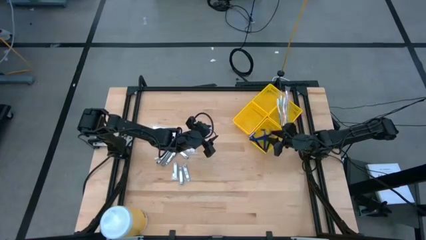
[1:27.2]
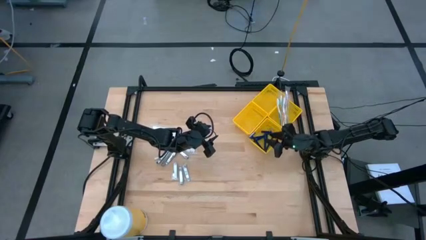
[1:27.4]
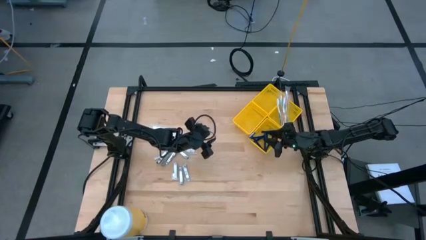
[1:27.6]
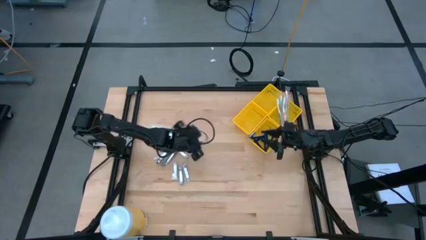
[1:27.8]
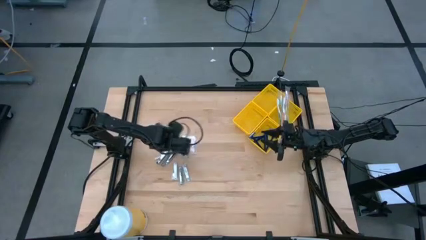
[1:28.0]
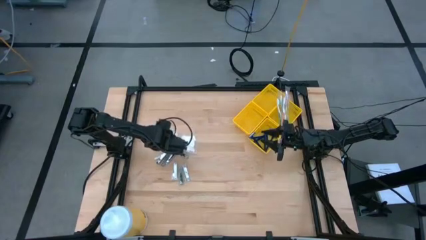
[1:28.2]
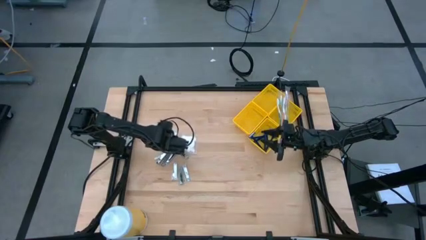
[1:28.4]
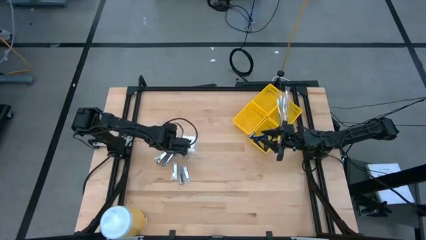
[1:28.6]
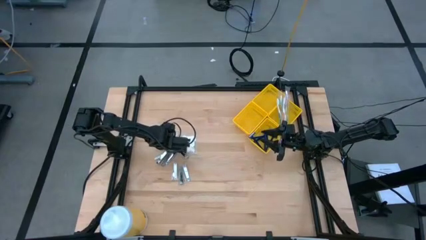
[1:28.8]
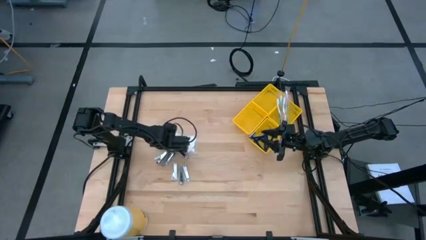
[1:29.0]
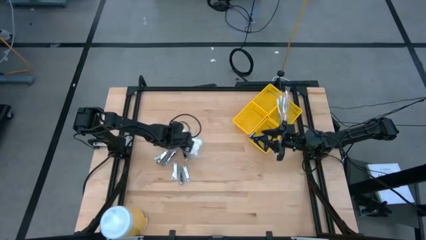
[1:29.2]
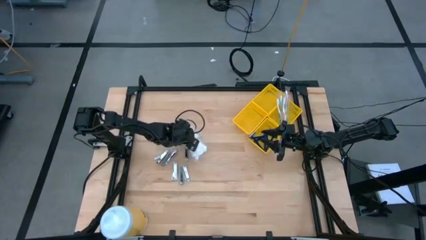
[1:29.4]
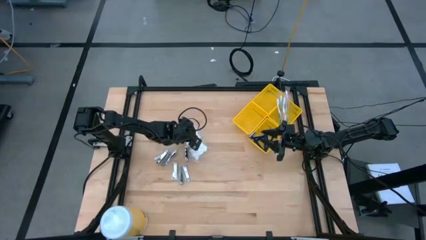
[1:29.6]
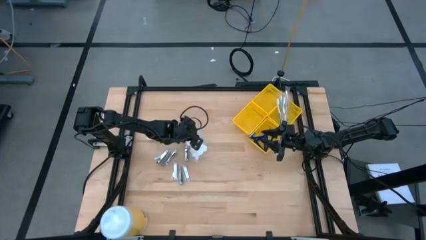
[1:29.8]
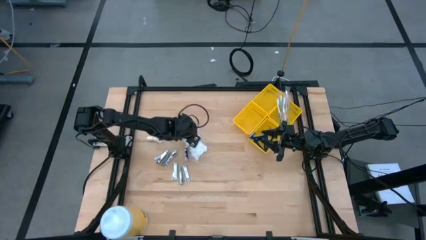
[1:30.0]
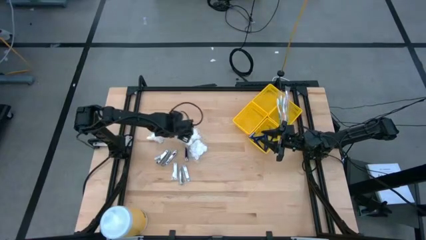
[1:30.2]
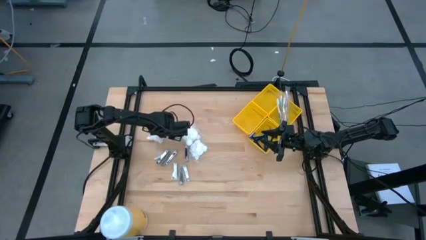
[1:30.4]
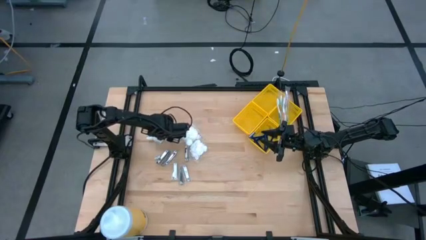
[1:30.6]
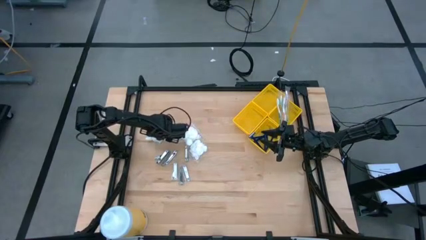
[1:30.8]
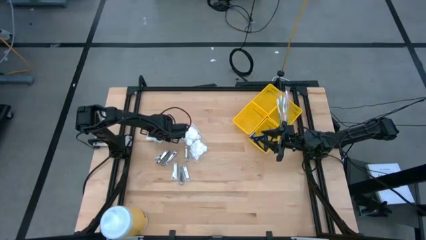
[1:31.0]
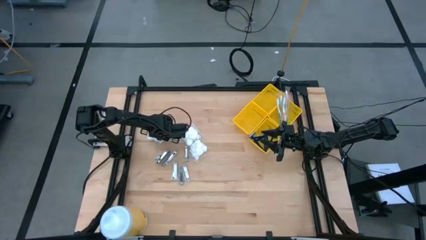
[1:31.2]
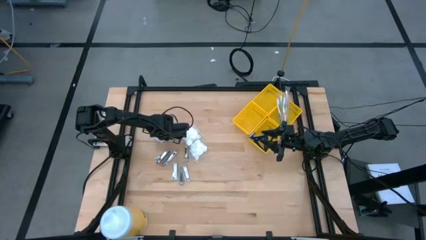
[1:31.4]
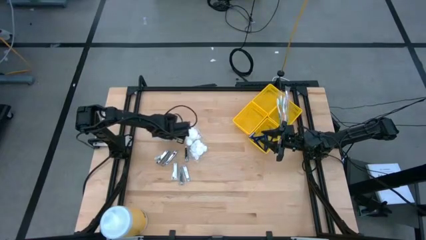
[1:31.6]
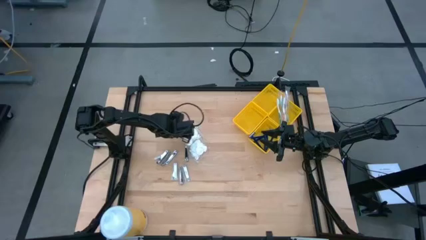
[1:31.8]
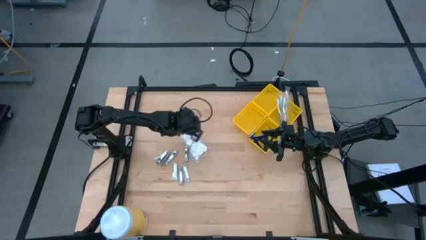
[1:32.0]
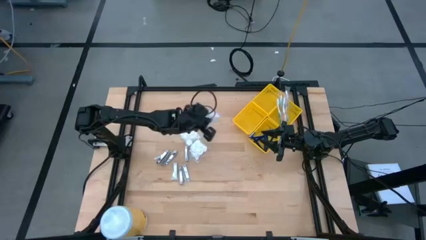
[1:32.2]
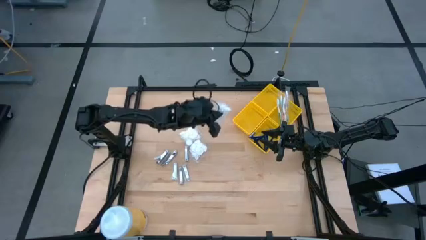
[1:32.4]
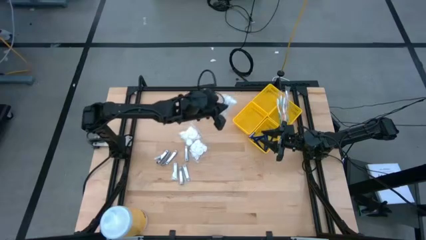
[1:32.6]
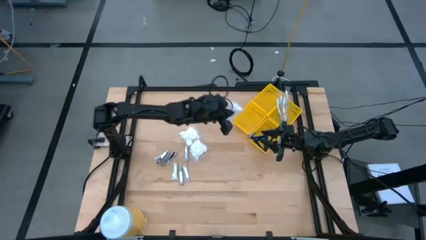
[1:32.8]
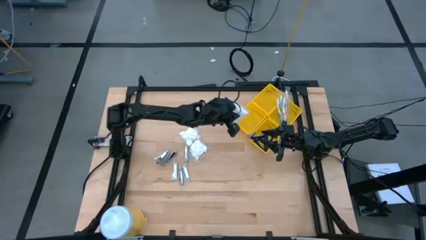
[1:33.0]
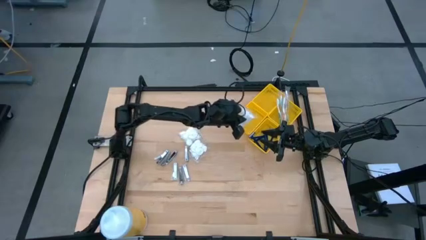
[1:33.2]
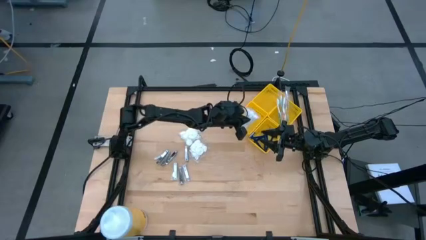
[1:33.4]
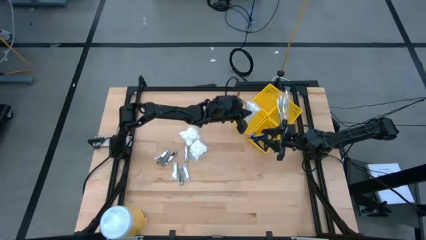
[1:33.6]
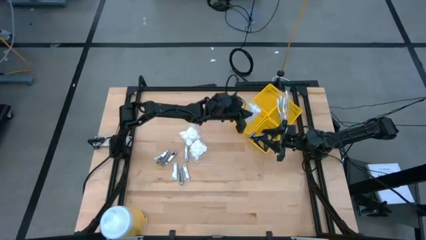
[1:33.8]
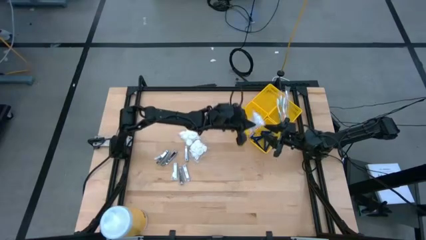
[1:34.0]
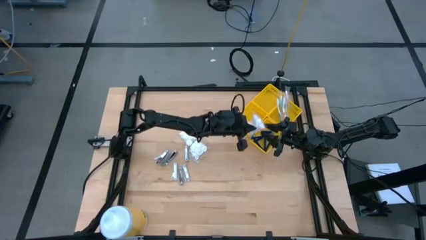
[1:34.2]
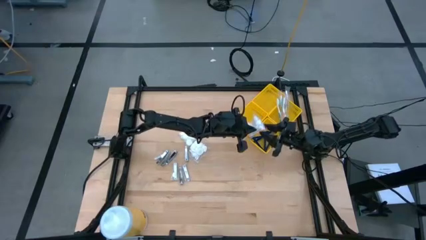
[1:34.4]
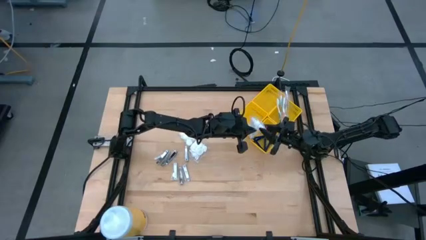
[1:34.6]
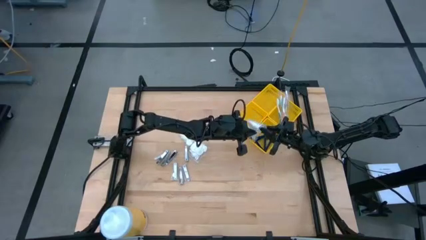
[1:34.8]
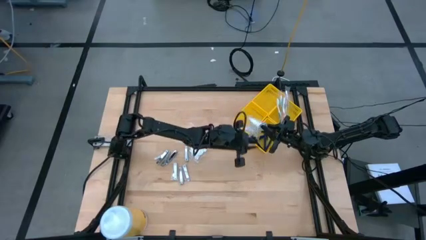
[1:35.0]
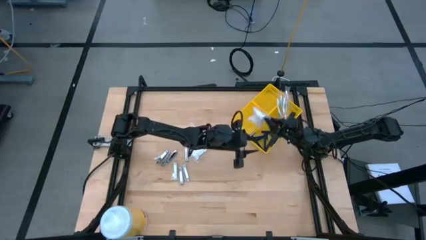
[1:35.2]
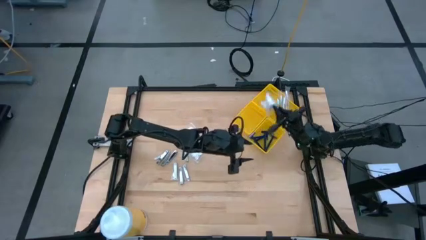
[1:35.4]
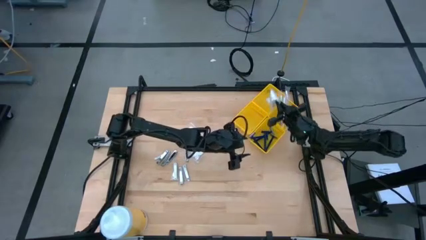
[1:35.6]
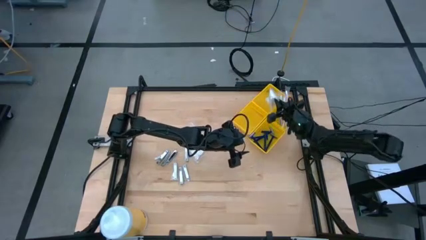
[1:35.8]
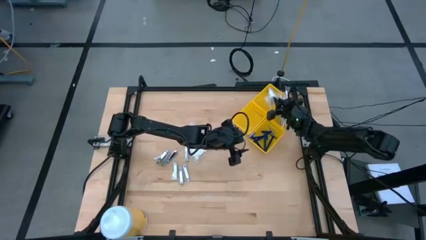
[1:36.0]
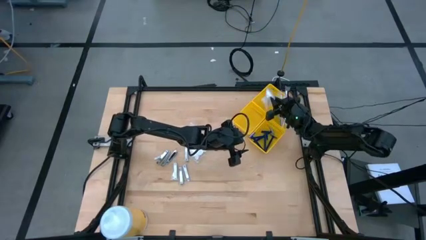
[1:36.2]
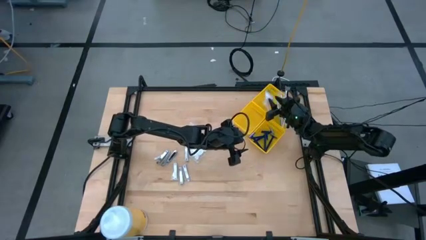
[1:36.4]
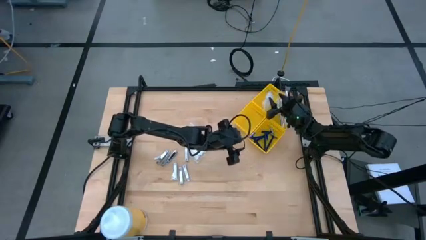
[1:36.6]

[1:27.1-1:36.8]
Task: Pick & Place Travel size toiletries
Put the cotton pack into the top left yellow bin

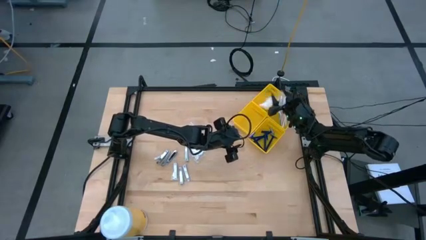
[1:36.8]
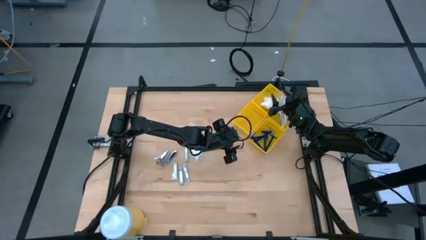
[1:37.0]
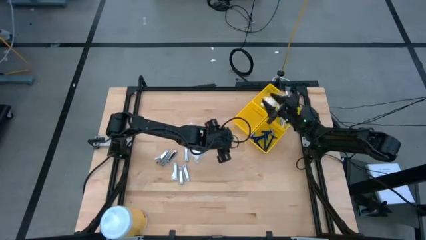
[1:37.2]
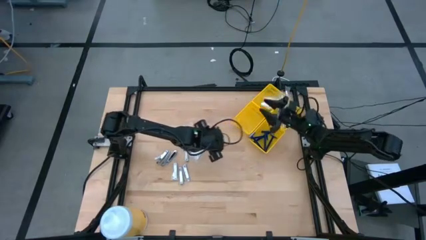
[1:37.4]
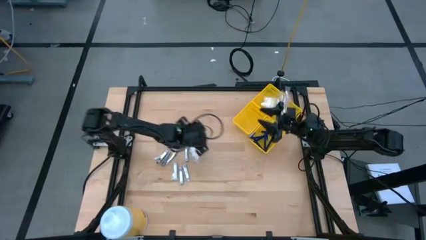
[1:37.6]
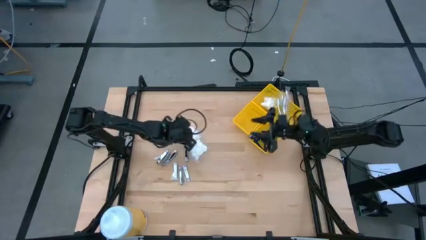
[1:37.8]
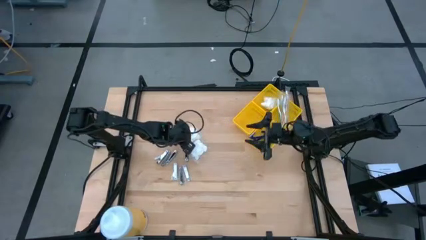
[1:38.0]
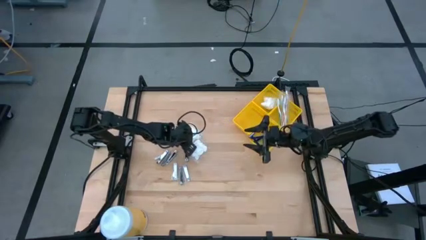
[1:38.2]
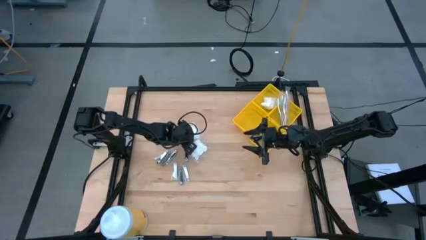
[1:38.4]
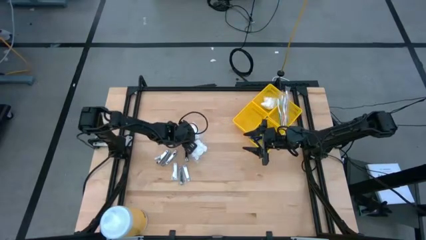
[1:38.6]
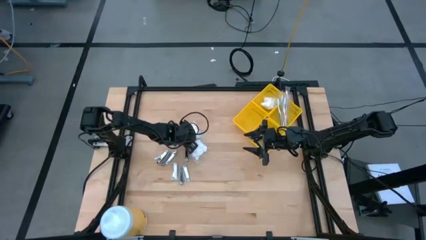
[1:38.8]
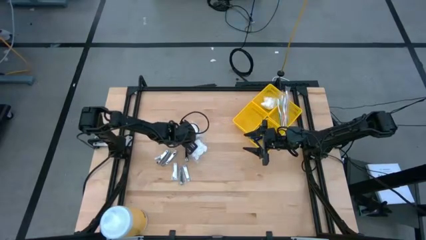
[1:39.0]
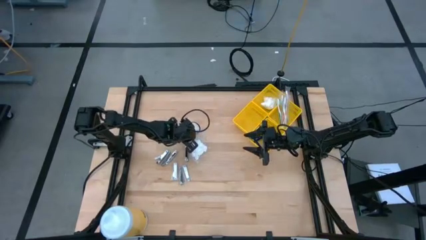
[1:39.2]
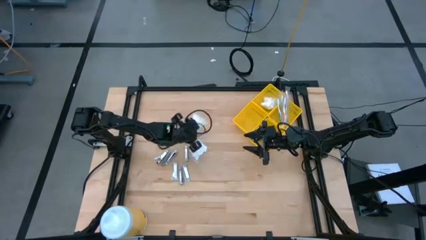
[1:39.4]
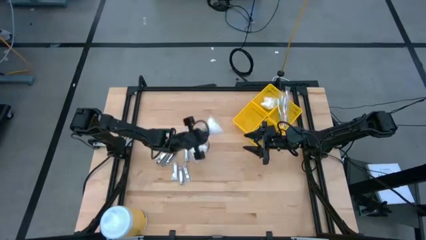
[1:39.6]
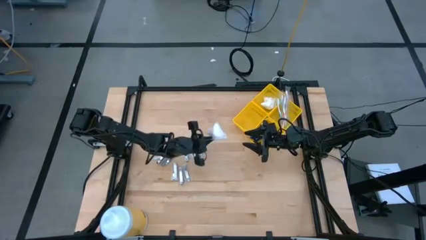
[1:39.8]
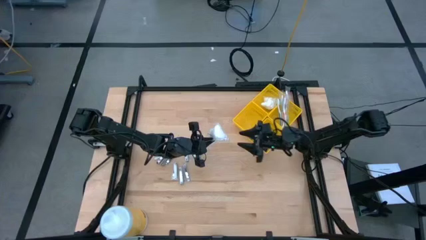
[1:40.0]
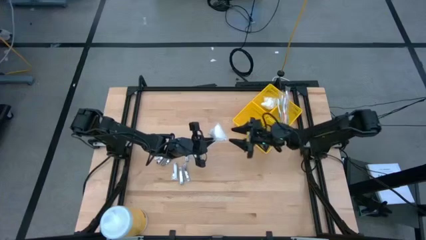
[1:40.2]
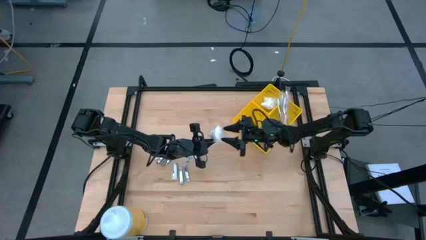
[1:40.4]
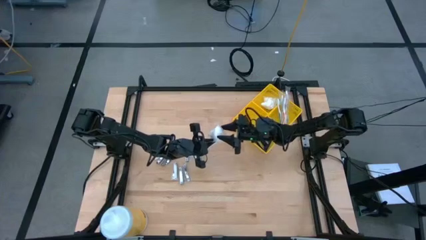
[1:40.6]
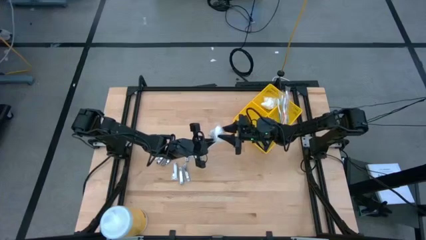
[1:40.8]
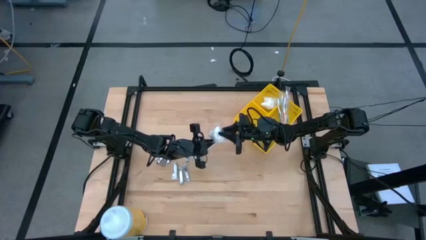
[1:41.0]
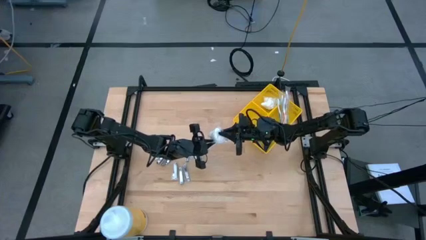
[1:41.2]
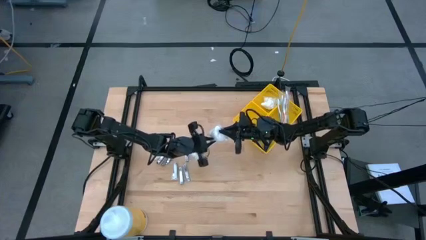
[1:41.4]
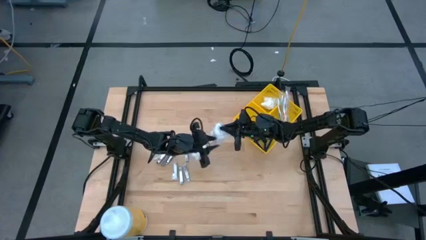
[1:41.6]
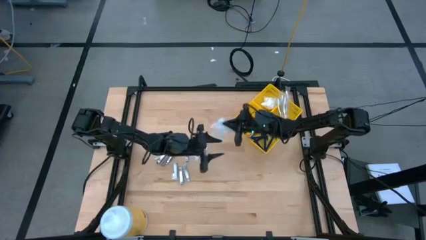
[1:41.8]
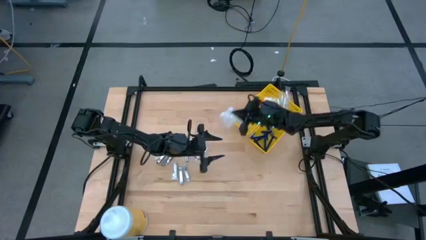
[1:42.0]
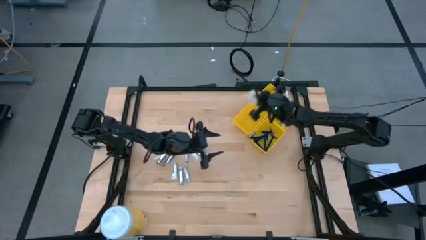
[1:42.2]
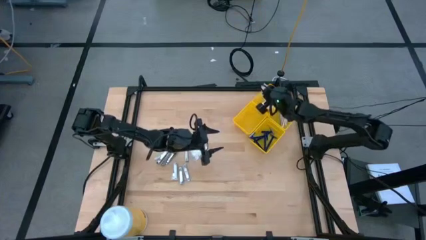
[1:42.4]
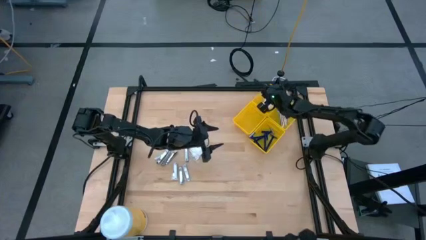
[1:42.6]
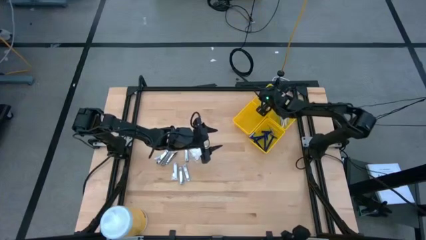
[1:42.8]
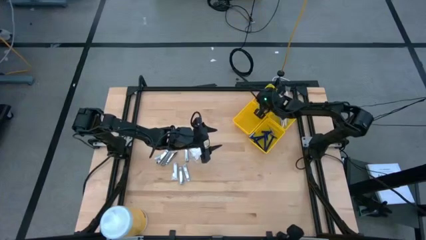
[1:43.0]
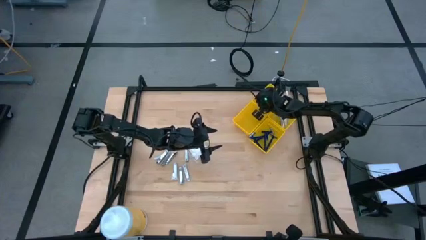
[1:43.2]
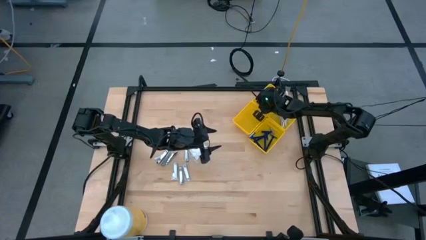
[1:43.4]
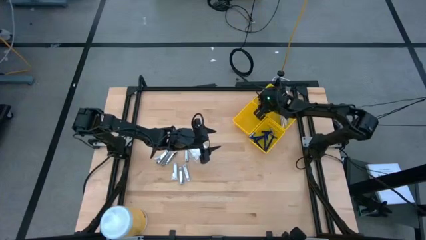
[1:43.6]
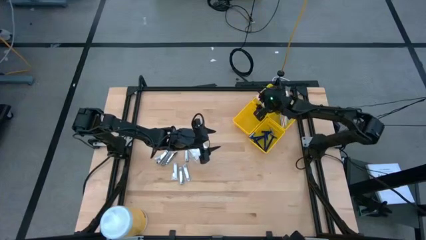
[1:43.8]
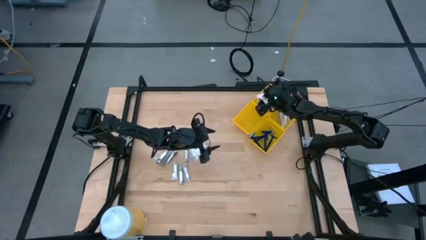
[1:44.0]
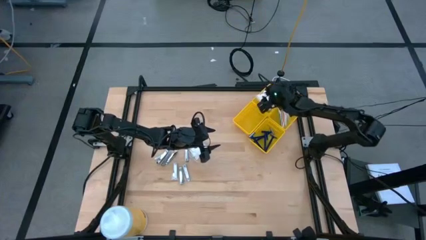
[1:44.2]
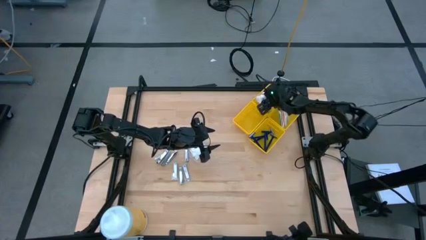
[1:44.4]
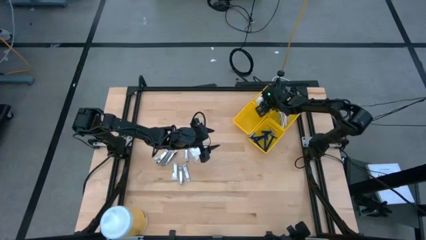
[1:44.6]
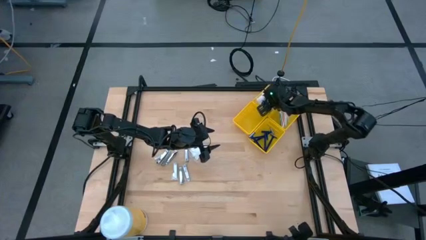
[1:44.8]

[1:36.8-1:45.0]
Put the cotton pack into the top left yellow bin
